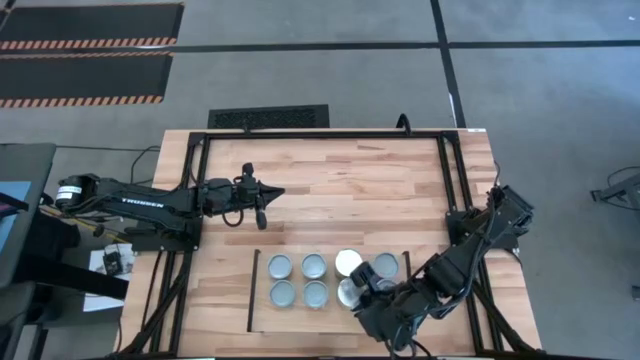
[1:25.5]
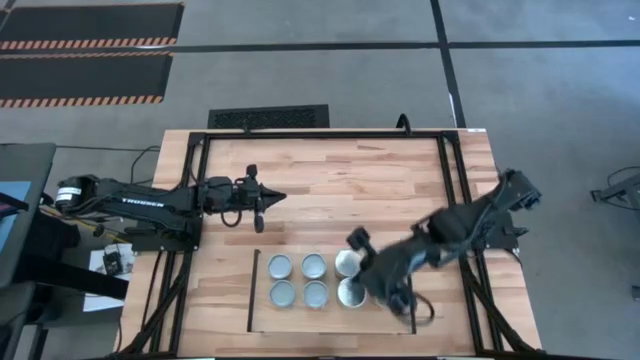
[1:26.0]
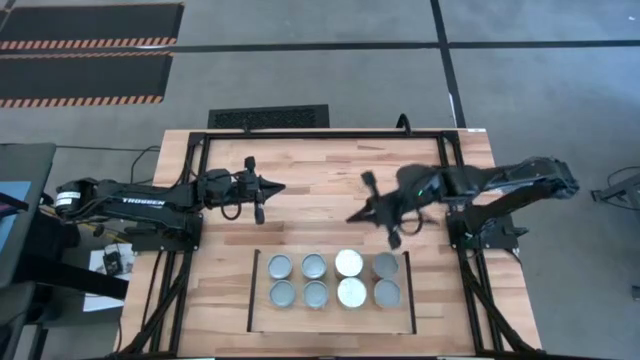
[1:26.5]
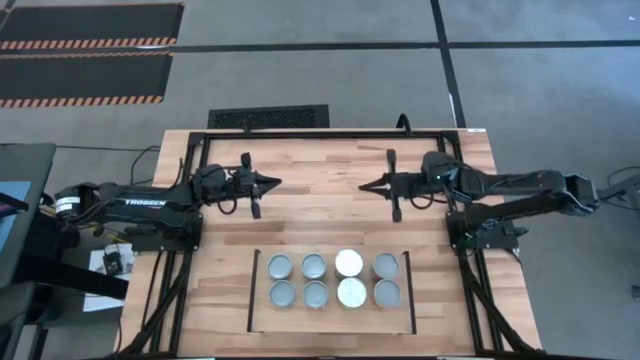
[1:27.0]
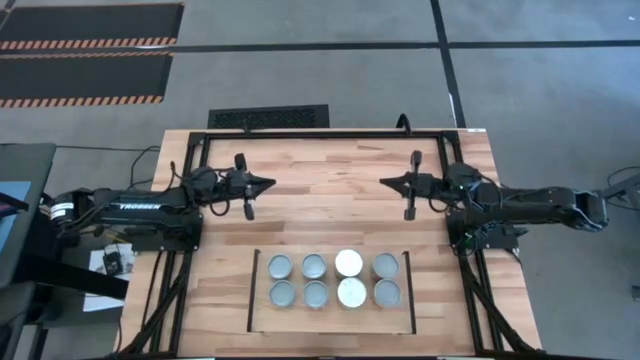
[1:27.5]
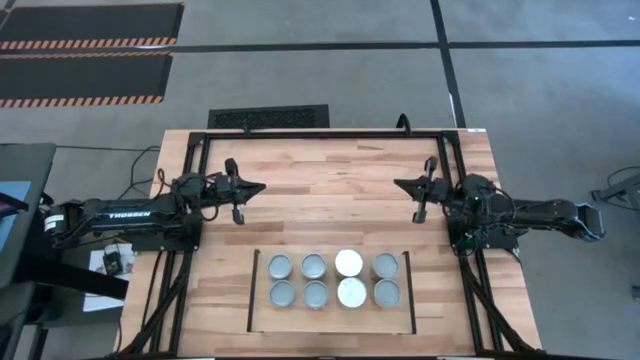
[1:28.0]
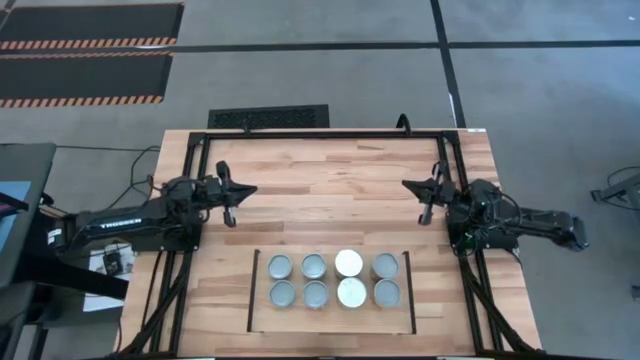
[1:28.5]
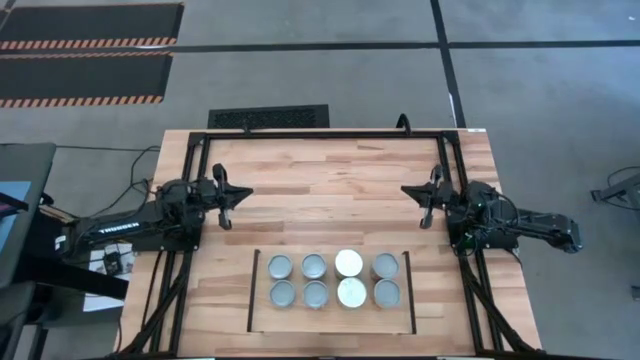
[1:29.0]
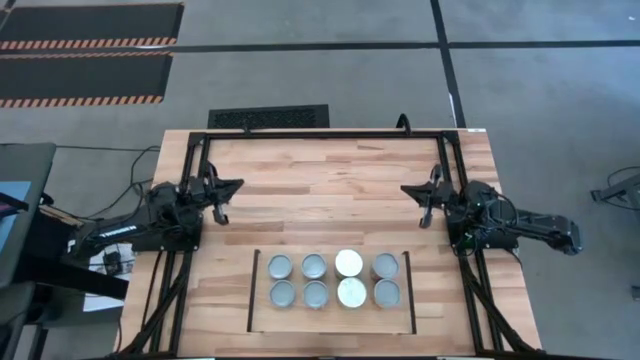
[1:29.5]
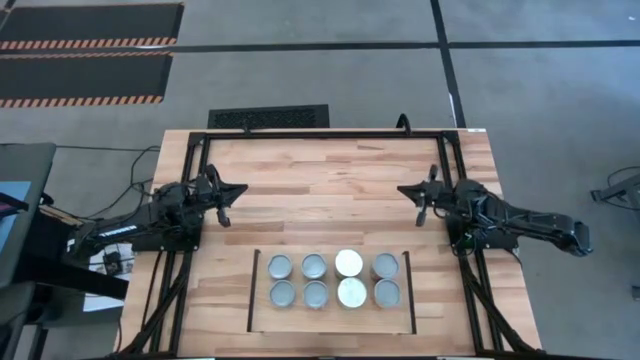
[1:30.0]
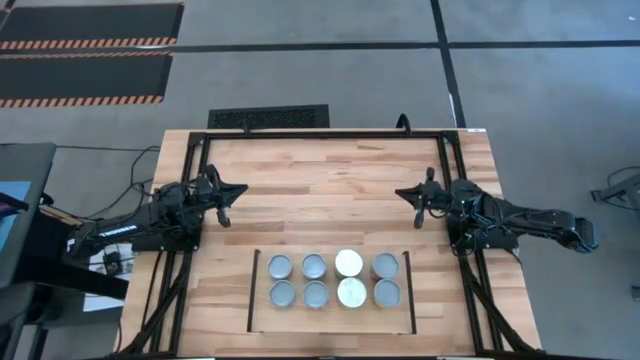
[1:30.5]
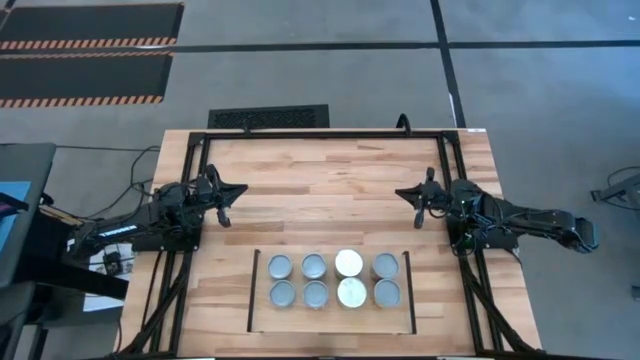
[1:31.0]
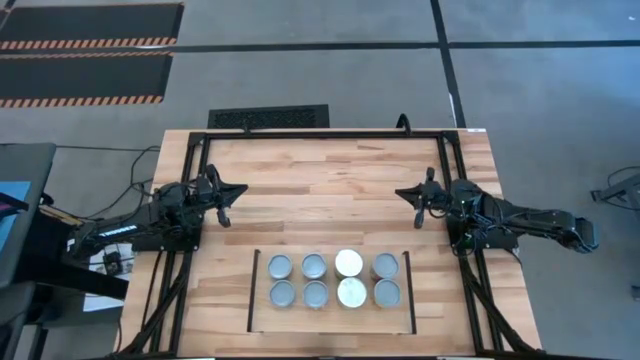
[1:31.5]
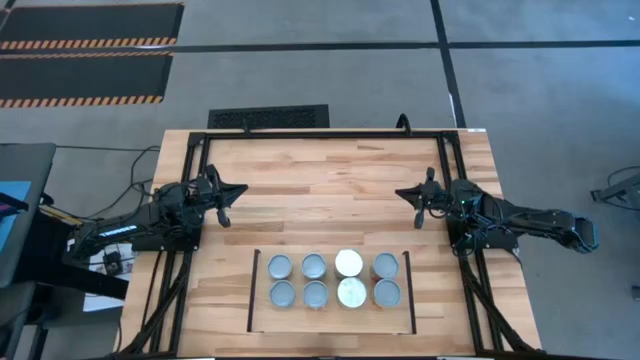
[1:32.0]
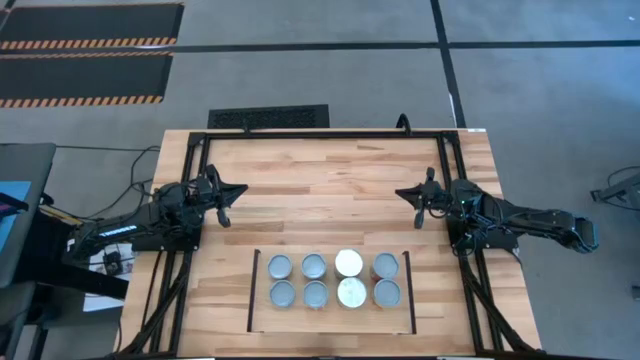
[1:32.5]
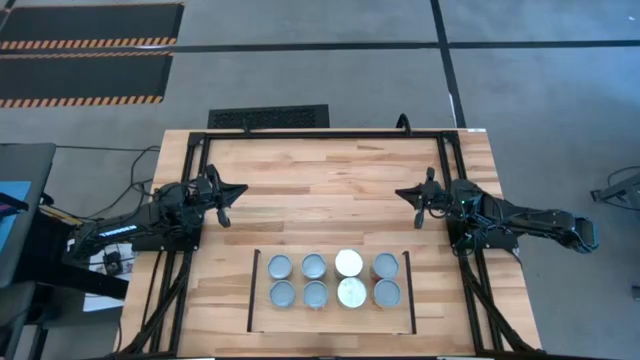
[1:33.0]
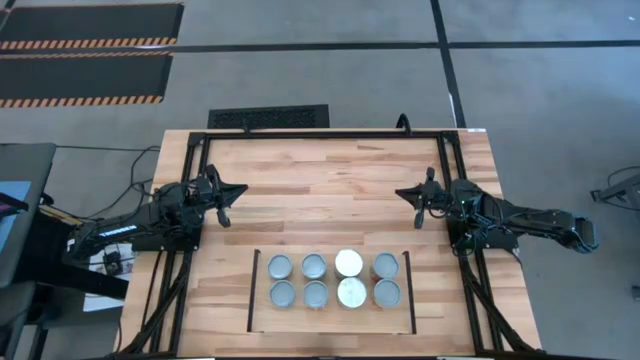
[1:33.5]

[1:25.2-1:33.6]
Task: Pick and place cans onto a shelf
Return to Home Position

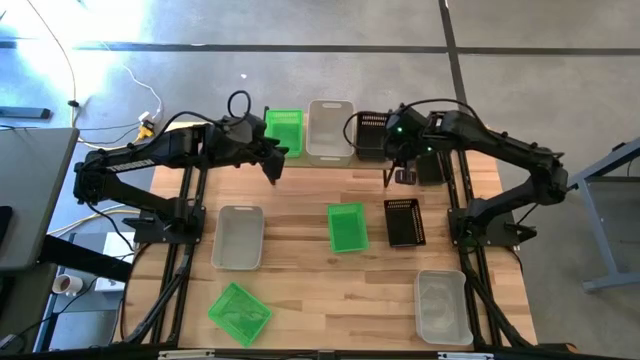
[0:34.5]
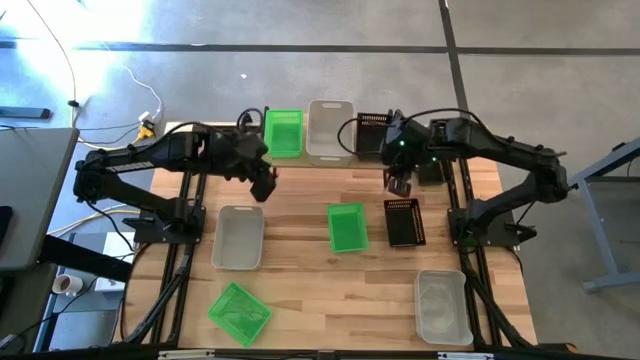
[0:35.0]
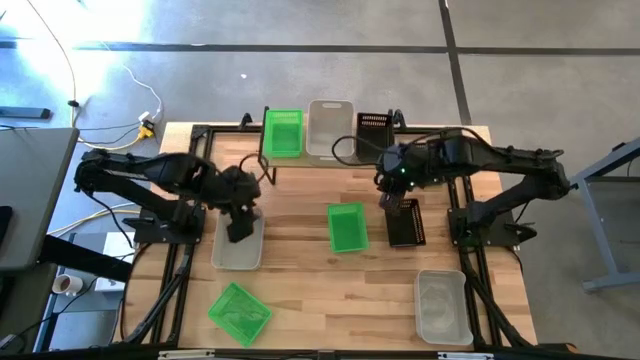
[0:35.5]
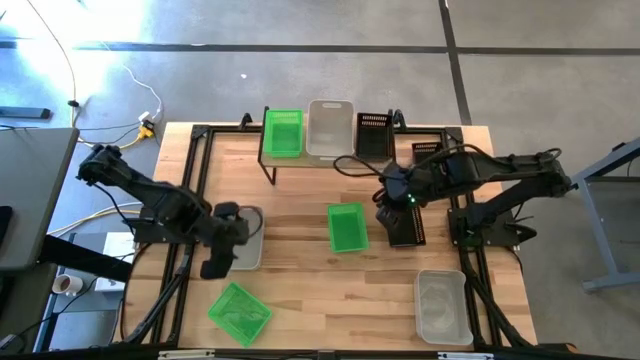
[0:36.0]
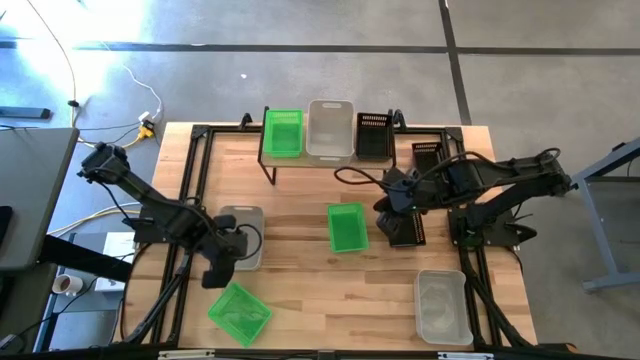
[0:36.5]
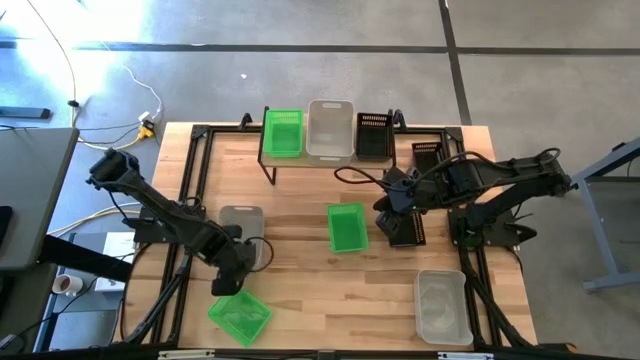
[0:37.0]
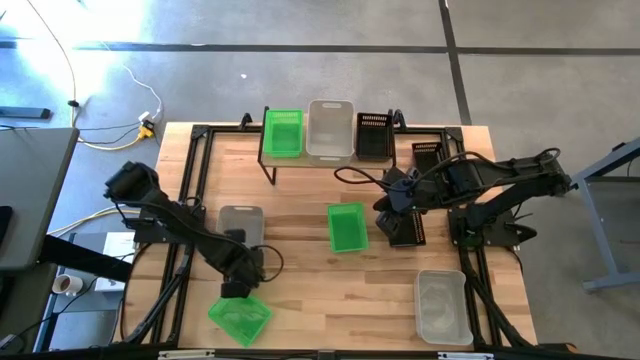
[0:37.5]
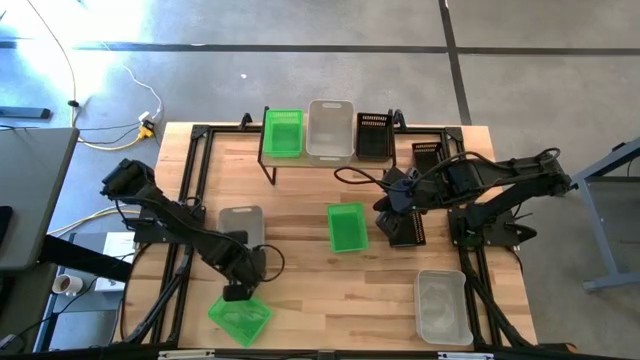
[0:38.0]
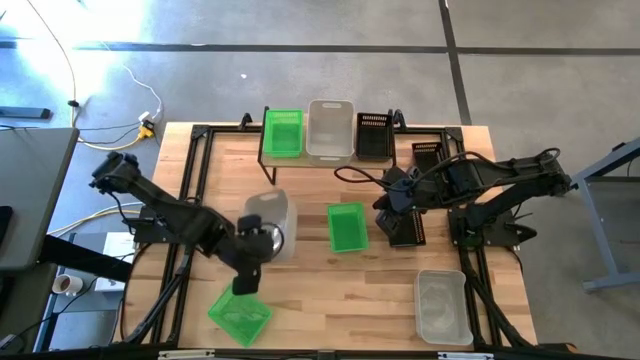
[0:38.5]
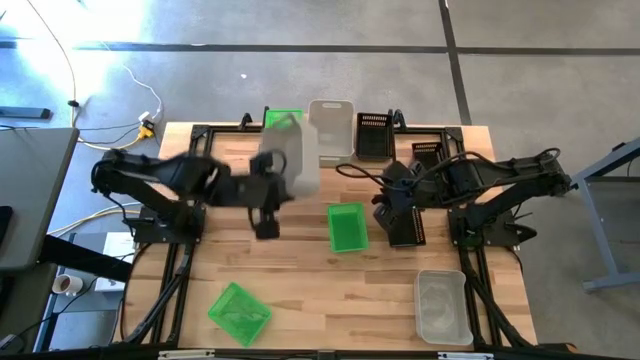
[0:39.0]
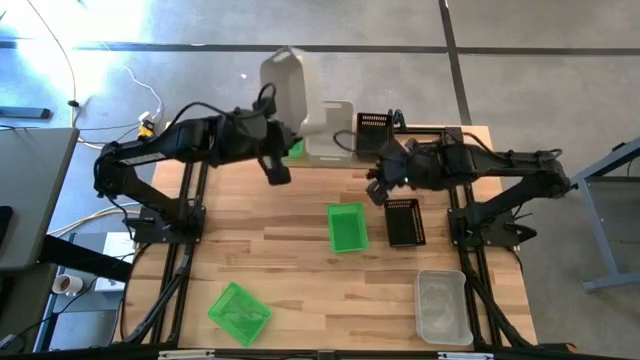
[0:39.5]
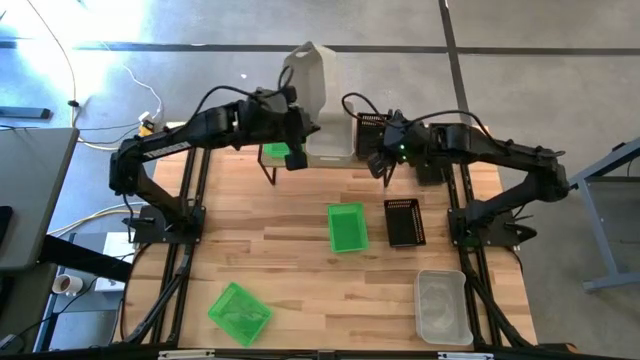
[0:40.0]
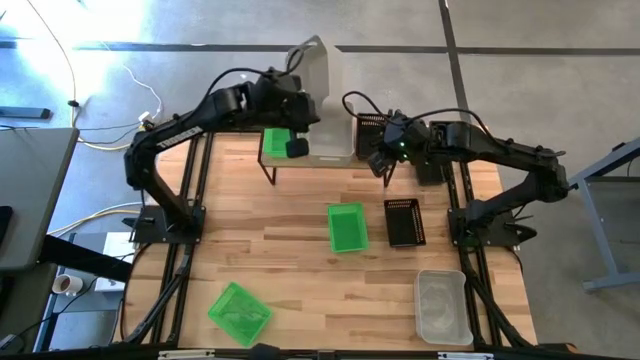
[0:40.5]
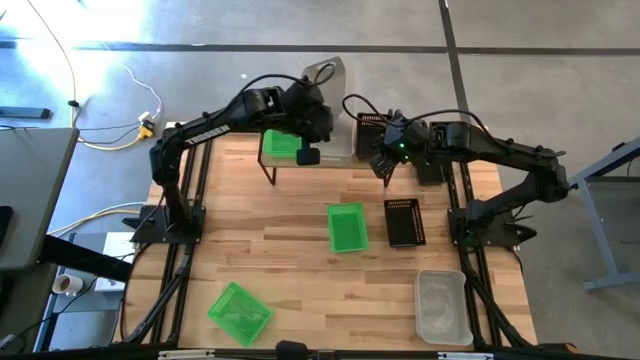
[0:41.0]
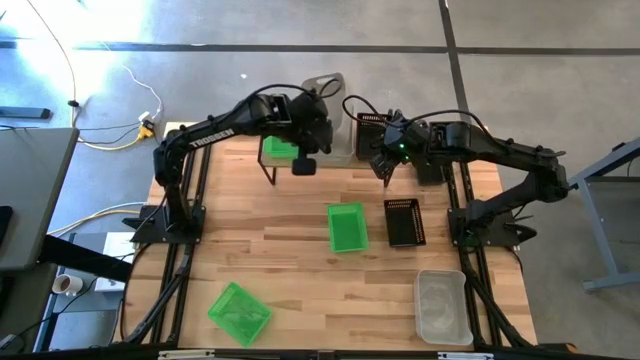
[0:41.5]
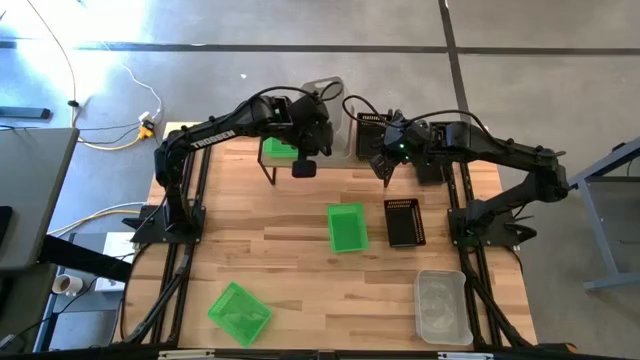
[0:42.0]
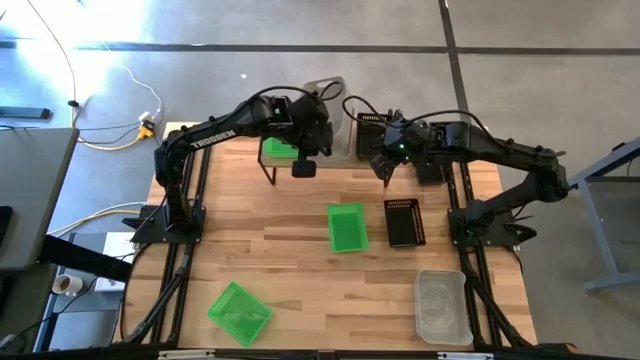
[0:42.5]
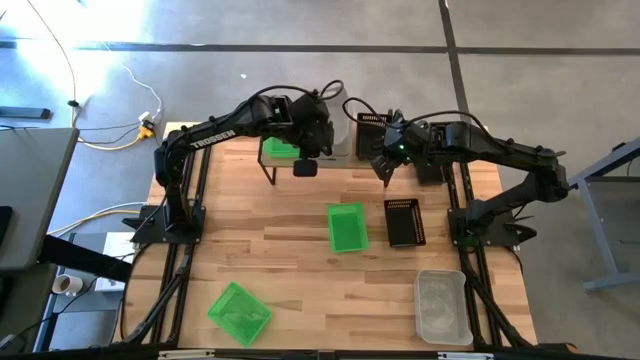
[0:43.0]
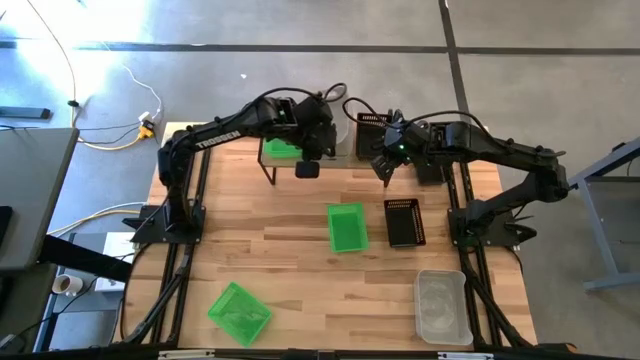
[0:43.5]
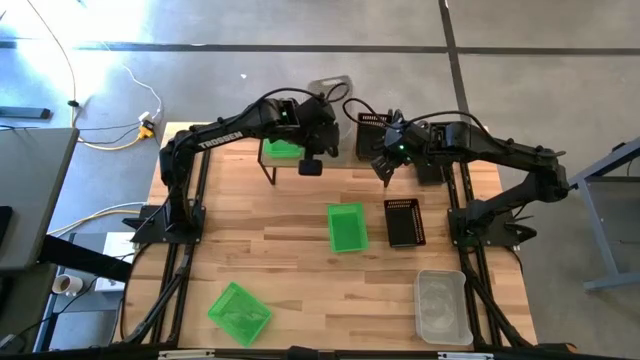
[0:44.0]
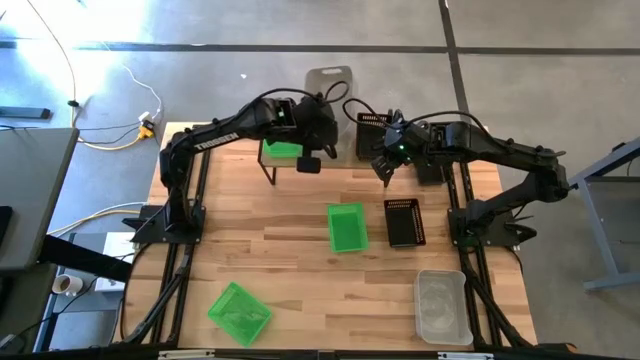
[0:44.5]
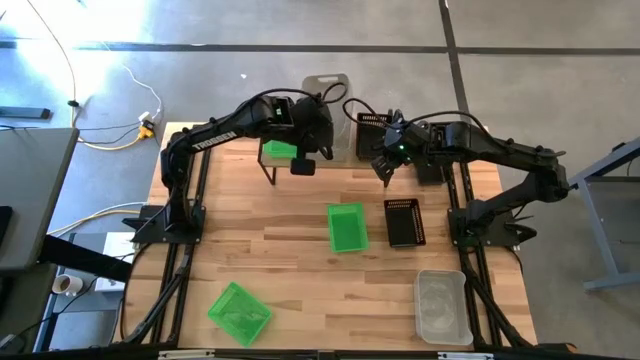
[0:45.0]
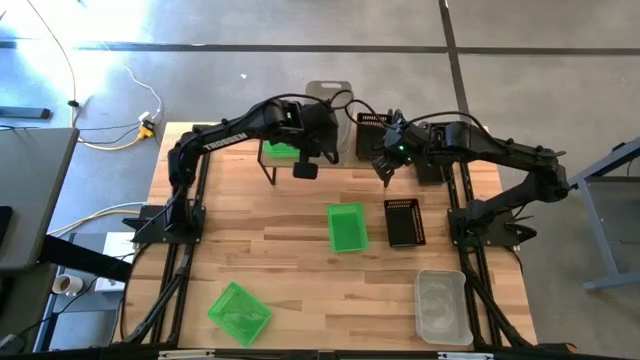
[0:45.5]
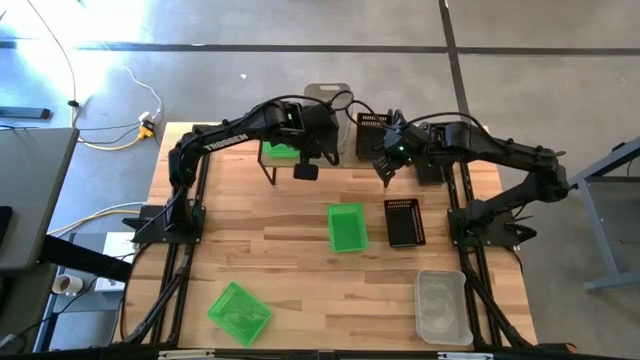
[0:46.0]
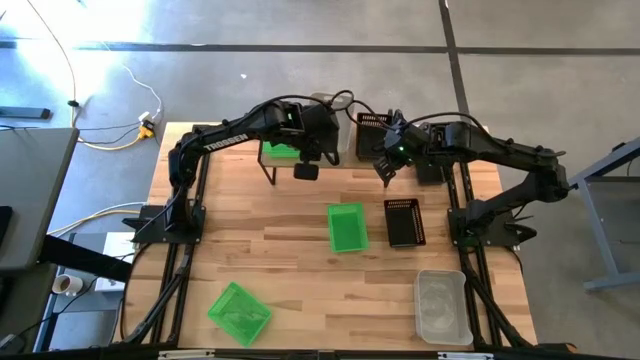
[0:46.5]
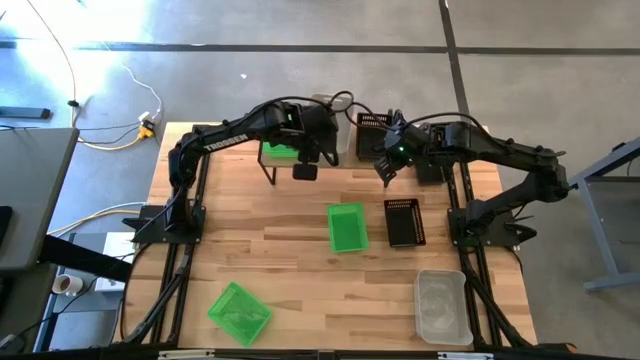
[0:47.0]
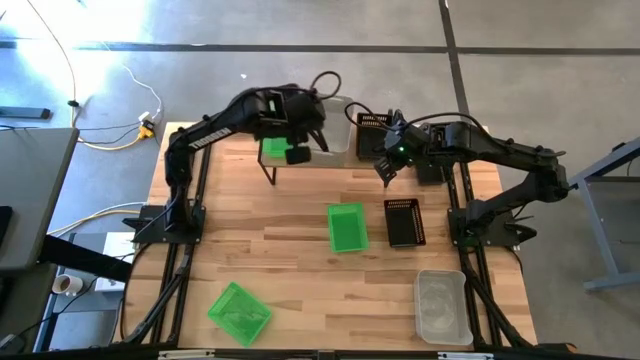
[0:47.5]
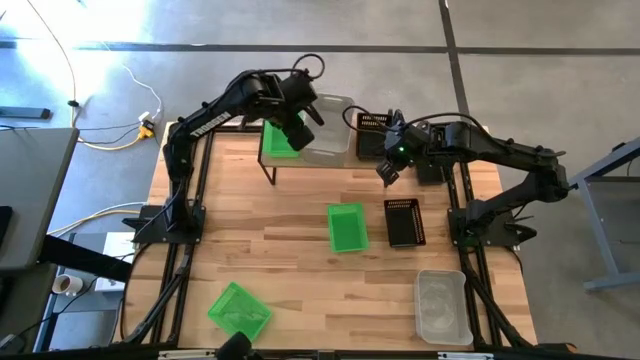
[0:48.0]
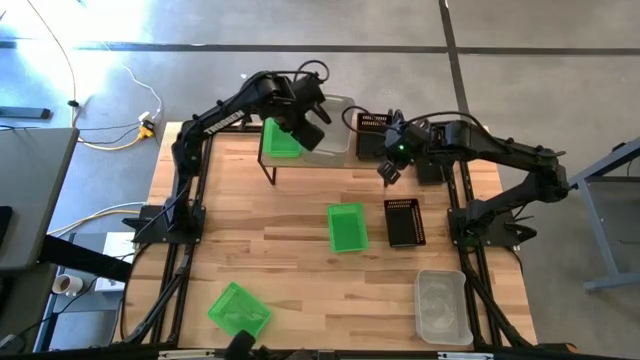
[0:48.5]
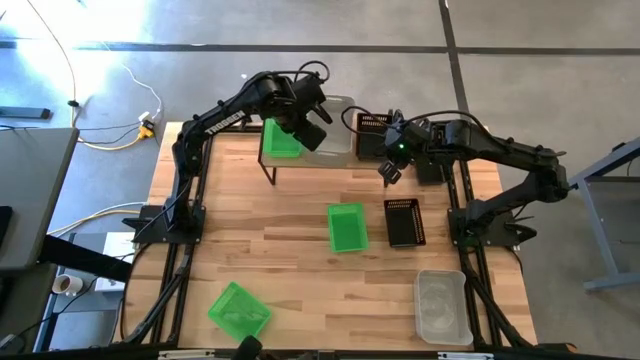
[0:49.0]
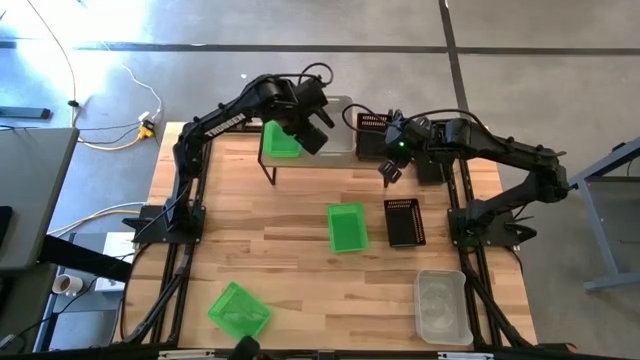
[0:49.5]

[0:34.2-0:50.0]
Task: Stack baskets on shelf by color
Stack the left gray bin on the gray bin on the shelf
